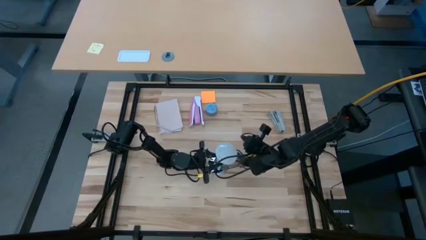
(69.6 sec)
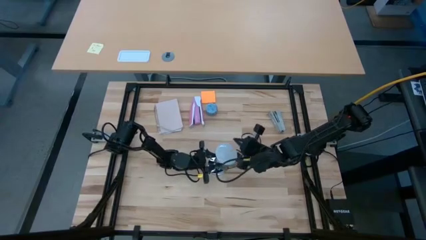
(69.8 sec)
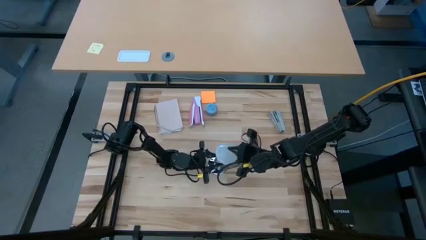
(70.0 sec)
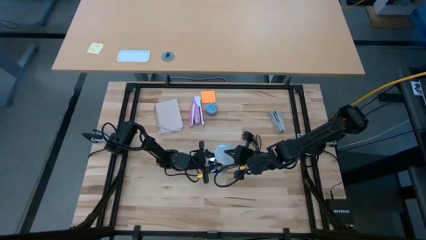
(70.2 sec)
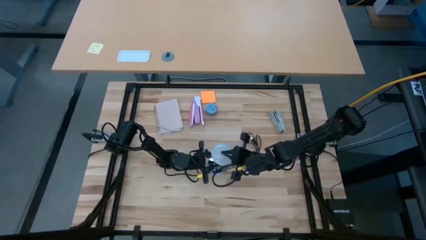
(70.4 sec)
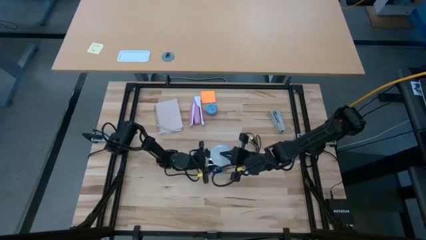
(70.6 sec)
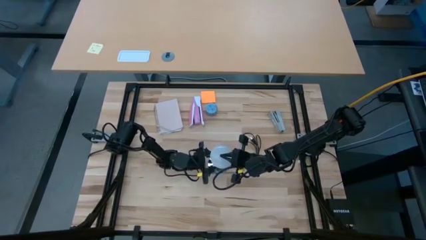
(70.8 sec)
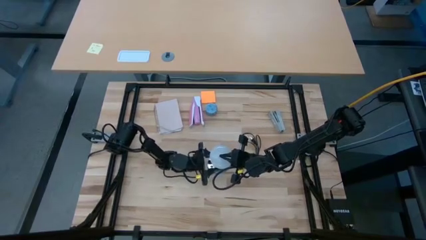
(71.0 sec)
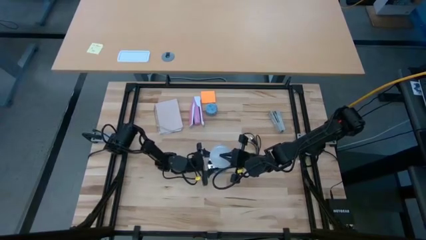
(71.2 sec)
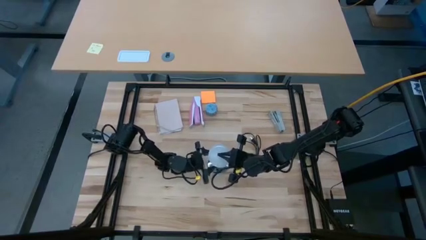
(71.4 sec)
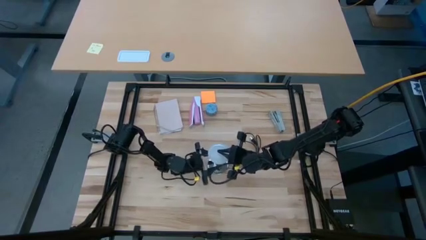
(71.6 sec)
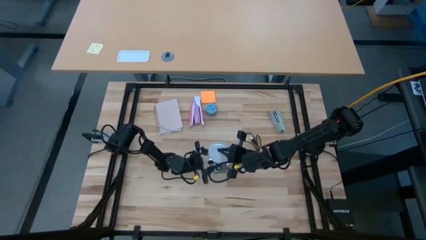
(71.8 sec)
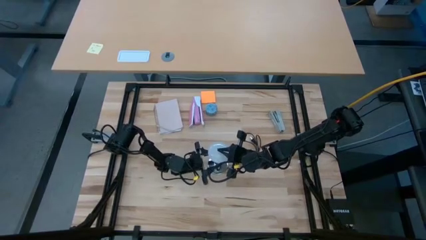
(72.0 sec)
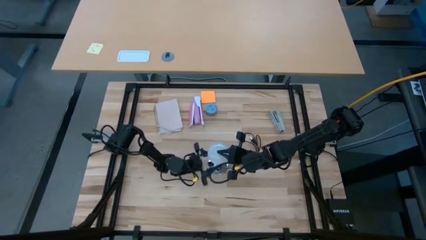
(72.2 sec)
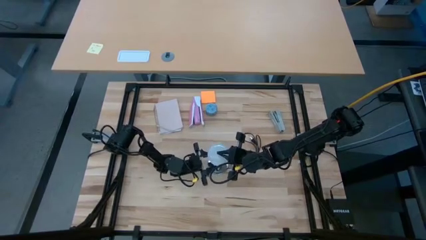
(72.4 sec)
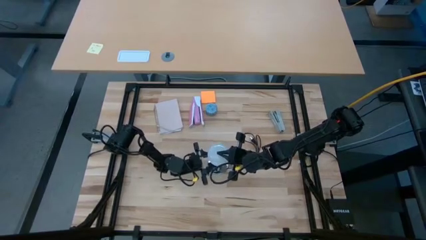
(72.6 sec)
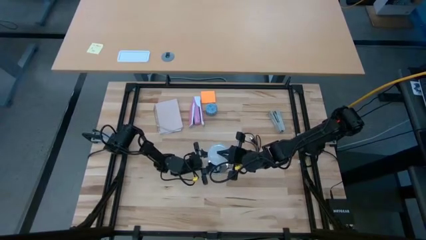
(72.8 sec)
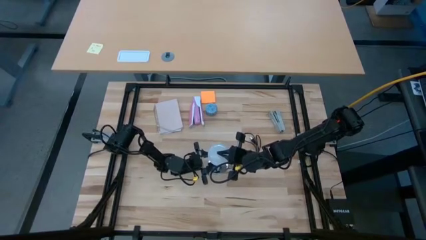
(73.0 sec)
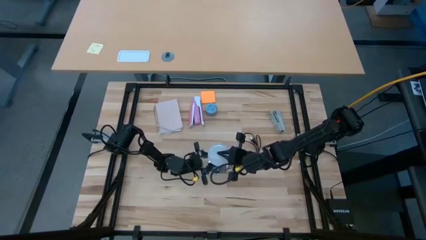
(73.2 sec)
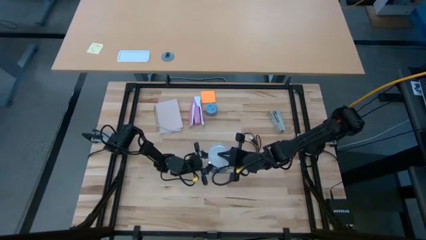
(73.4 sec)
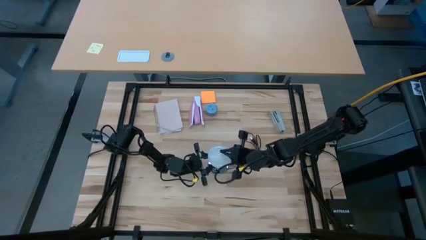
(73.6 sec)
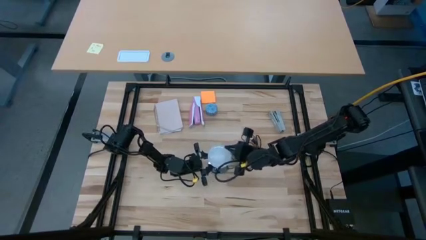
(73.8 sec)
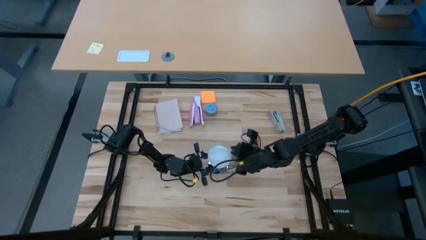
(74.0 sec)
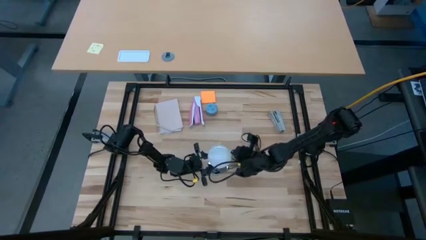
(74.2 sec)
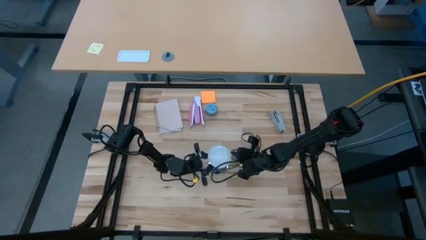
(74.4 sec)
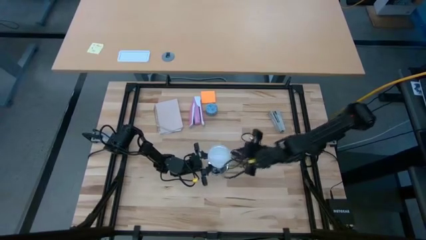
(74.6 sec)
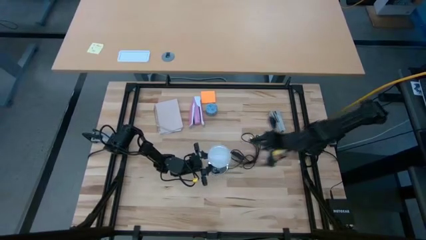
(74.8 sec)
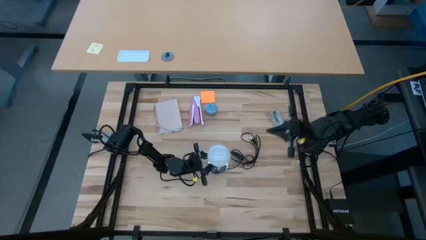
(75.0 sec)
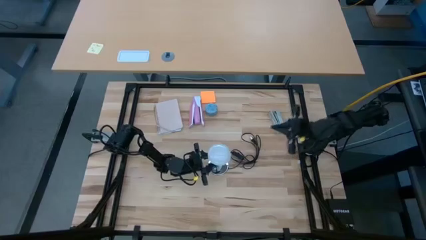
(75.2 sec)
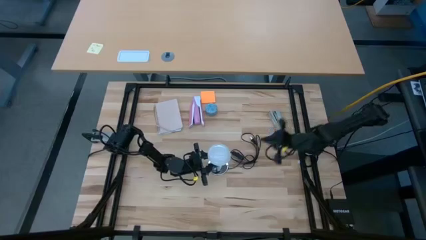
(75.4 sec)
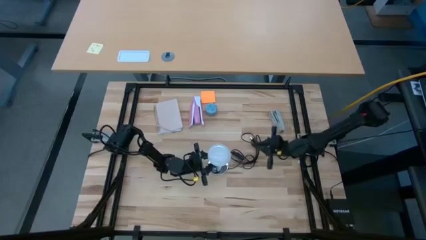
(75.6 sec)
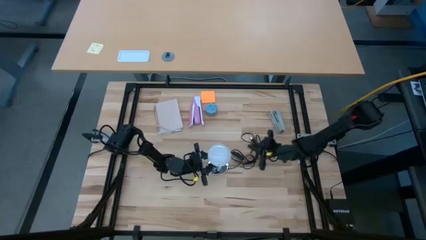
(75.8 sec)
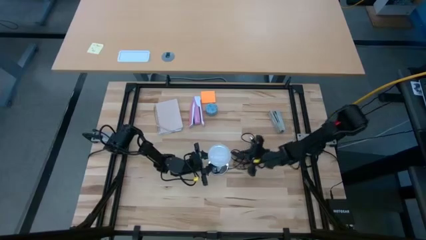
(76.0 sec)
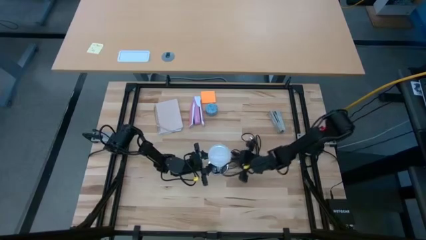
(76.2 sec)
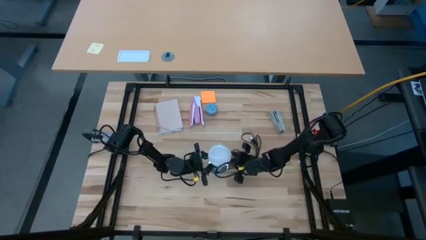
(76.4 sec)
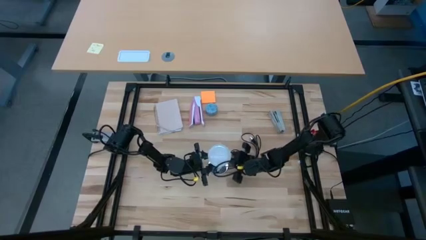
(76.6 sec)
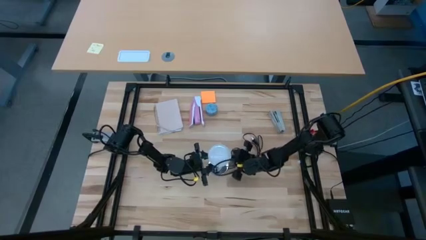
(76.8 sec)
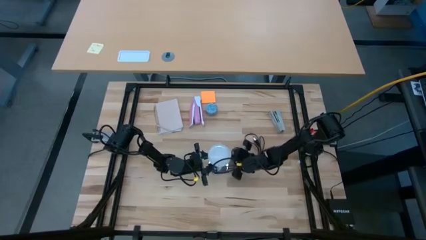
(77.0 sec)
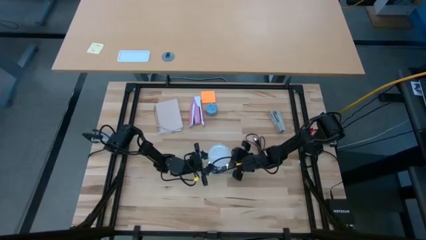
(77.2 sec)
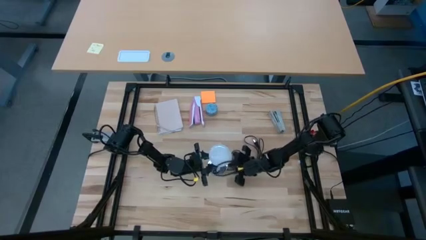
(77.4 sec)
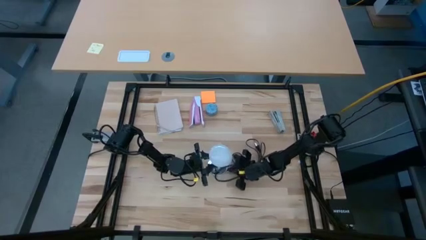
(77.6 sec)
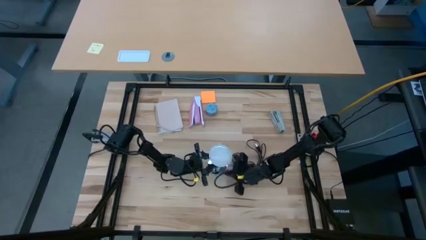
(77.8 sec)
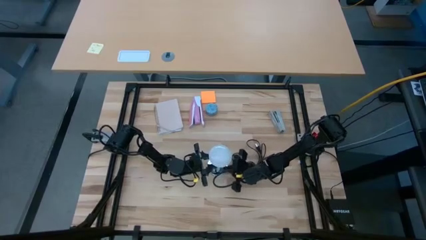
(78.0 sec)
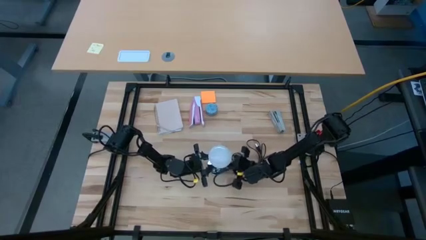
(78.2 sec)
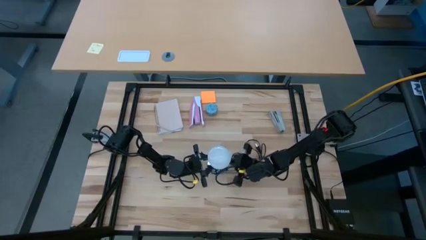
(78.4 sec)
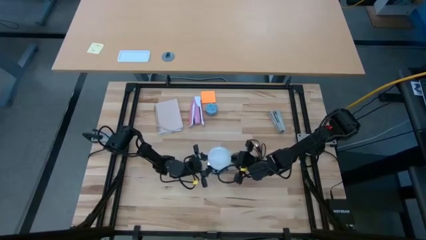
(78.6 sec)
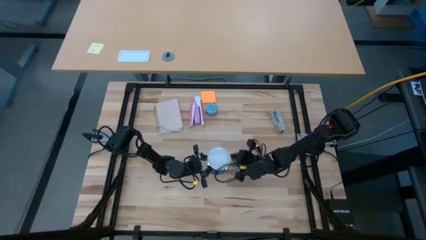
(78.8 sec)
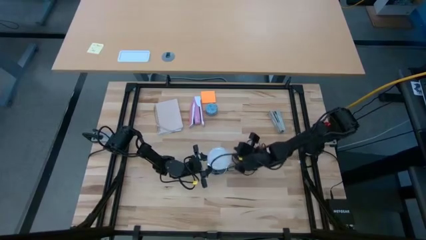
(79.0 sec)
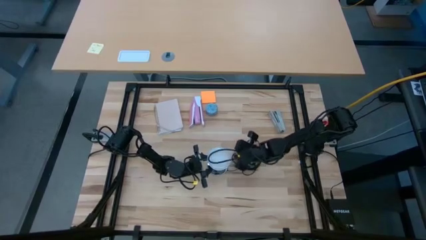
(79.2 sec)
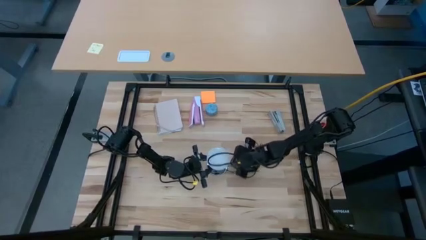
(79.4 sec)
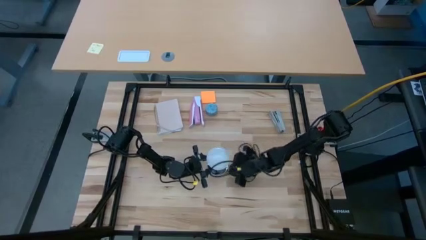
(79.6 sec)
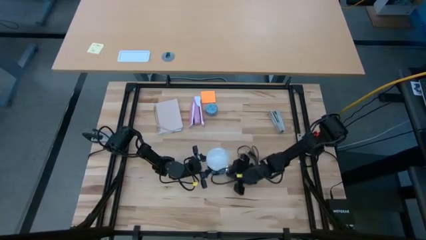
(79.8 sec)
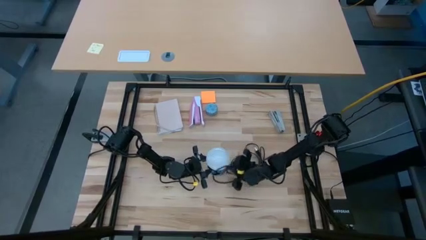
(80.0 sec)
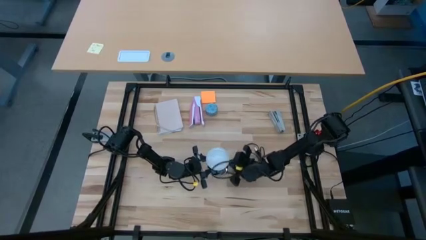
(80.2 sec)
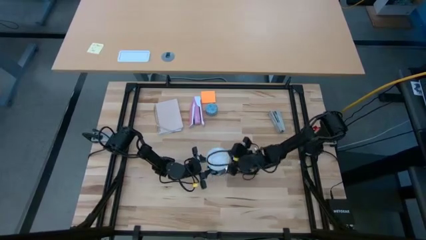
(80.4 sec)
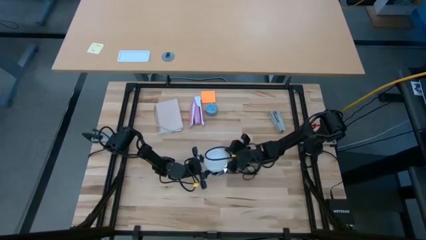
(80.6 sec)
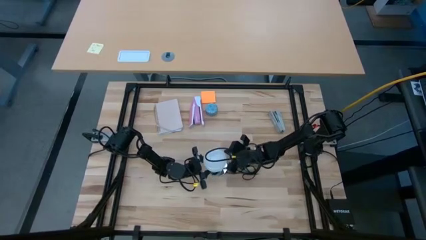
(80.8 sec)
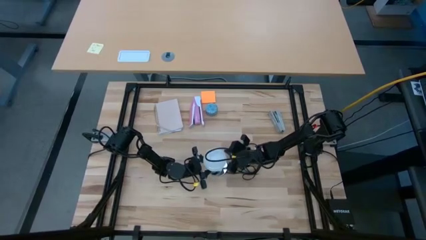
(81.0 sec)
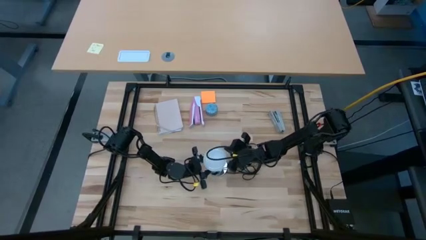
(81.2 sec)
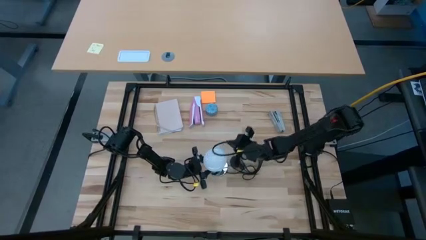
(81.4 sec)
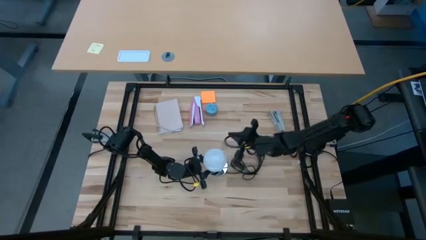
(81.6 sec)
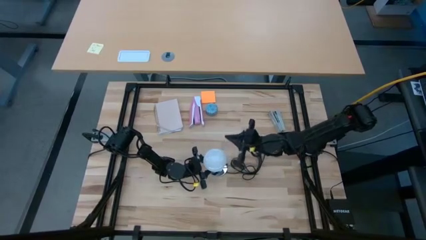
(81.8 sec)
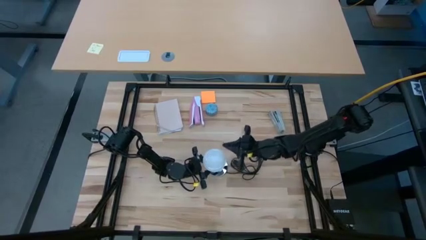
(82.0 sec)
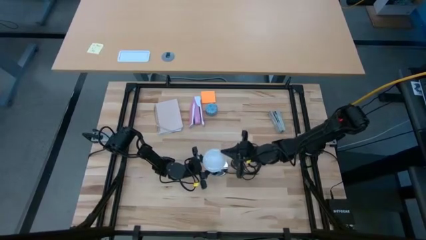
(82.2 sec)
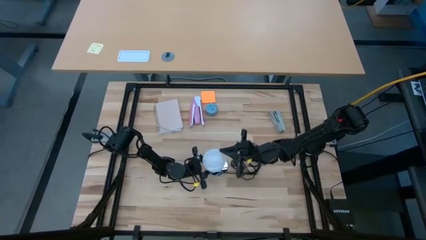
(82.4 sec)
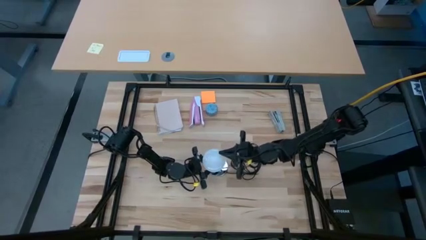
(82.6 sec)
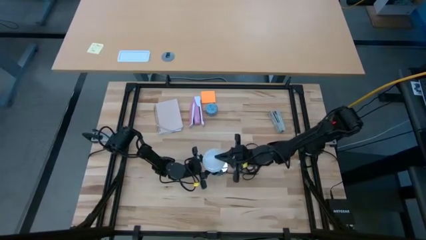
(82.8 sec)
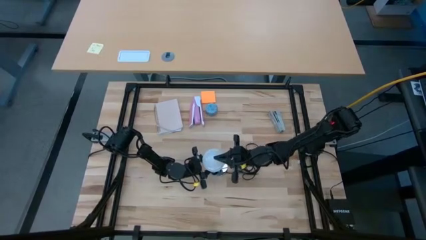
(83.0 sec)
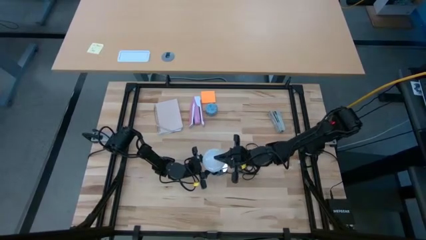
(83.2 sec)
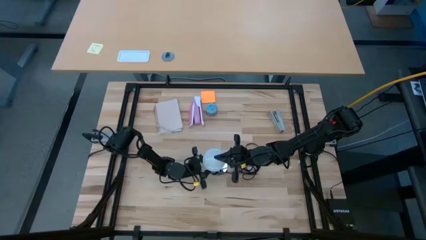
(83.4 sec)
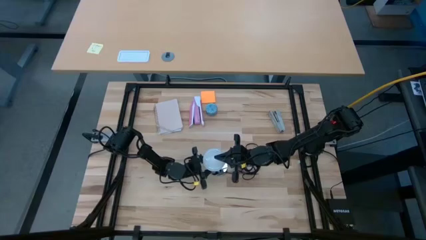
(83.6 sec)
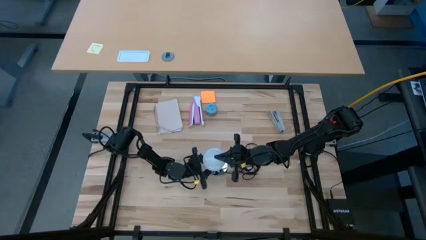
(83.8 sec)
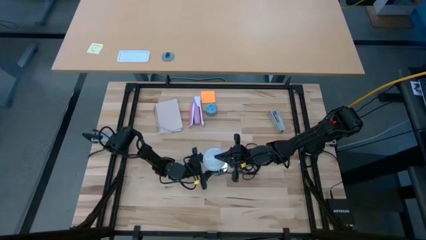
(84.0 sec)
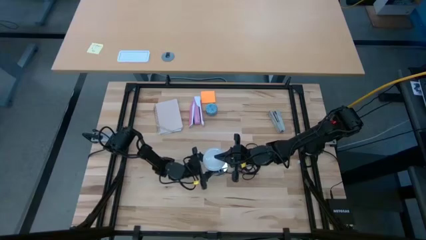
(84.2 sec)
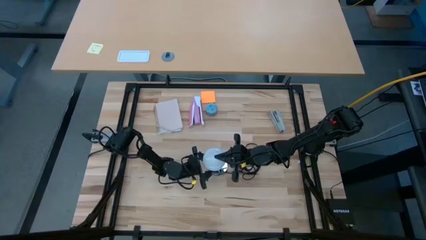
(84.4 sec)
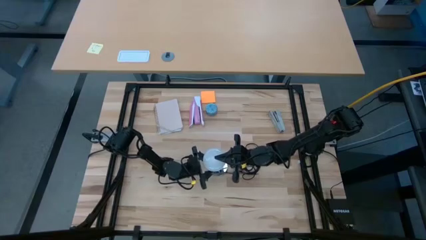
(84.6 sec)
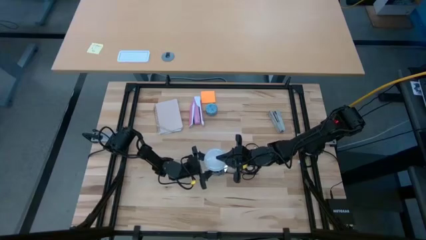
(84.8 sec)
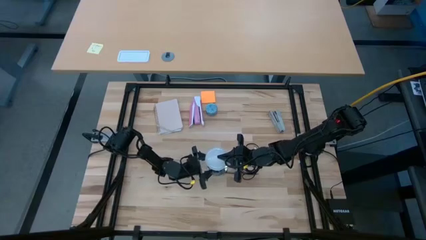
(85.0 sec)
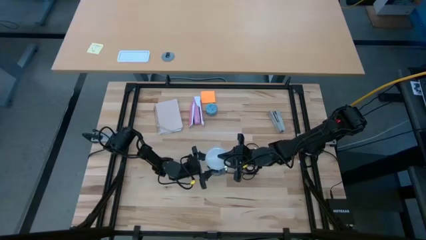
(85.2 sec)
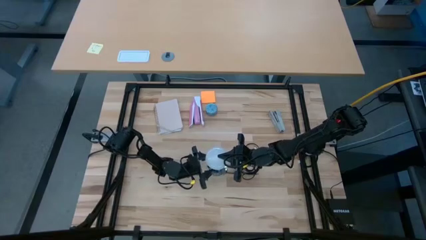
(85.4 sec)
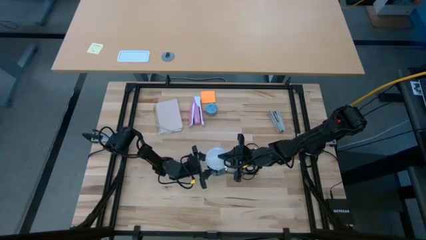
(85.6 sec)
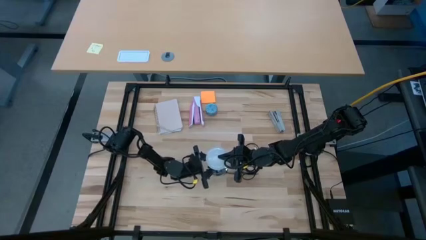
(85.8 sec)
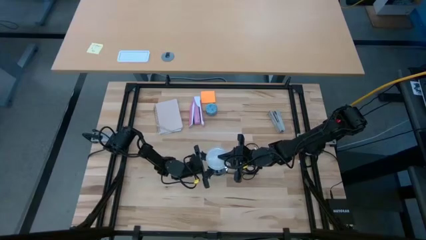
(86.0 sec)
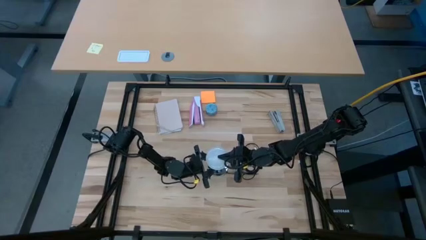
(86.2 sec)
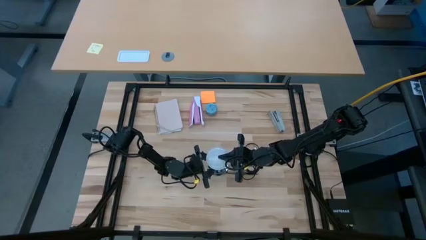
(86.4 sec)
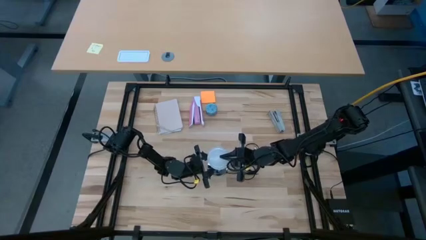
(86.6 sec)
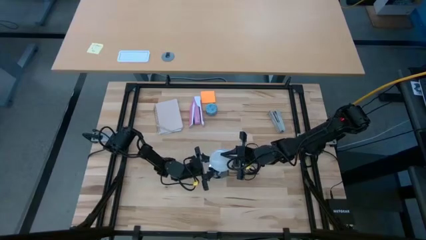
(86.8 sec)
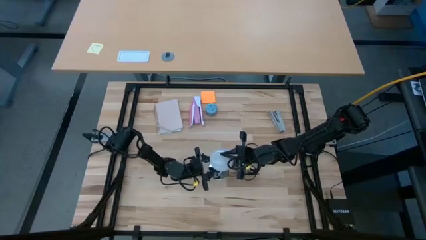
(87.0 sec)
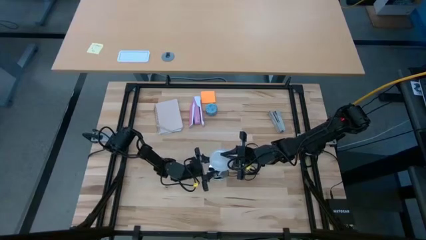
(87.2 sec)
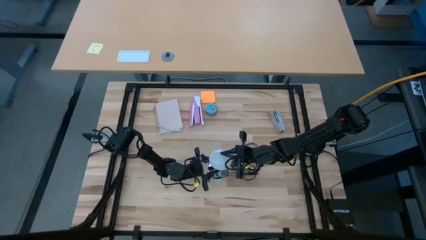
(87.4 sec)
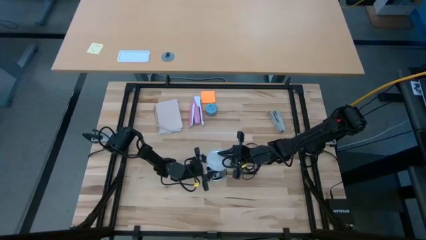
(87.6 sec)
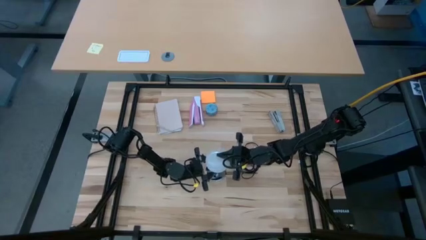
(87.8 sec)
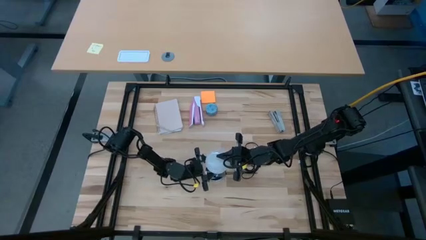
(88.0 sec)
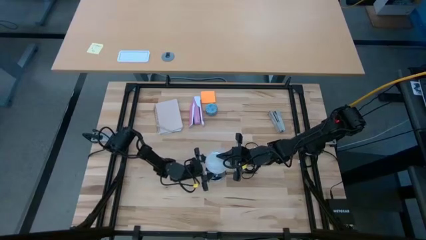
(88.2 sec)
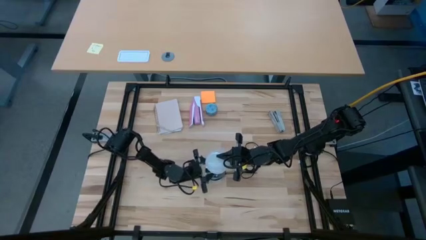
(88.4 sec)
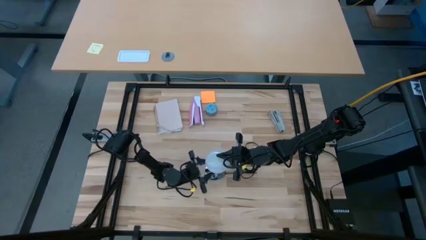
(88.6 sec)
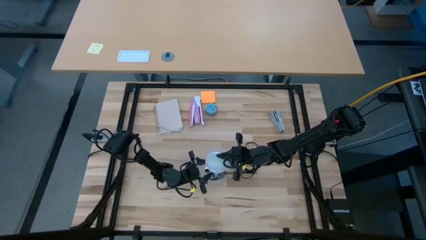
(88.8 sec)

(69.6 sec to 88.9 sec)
Task: Screw lightbulb
Insert the lightbulb into the lamp
